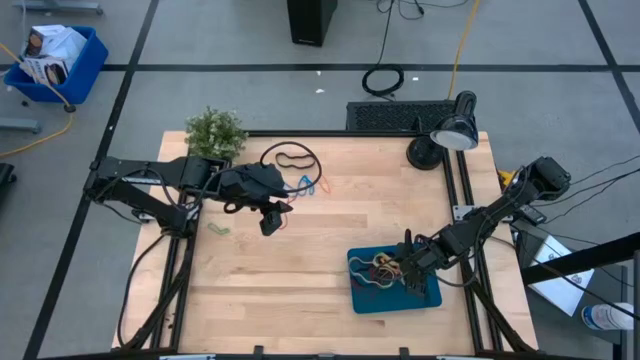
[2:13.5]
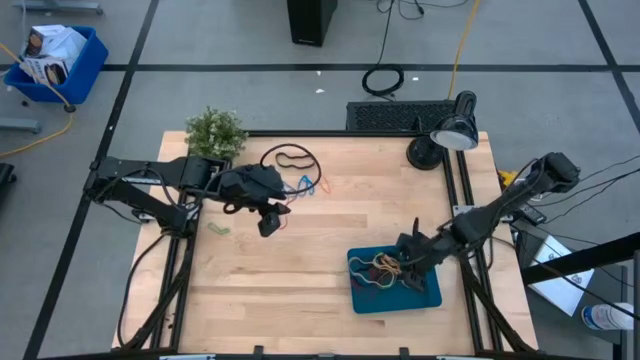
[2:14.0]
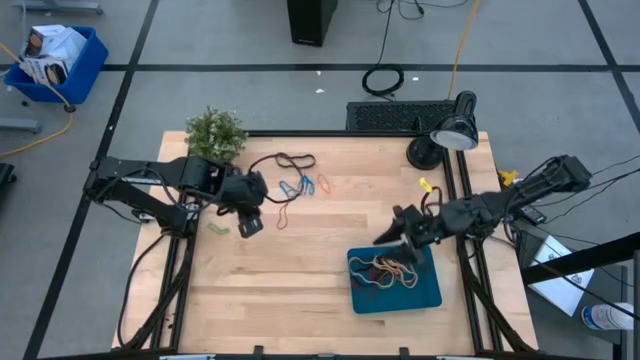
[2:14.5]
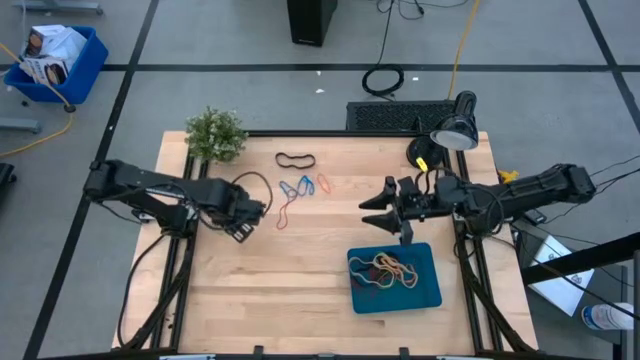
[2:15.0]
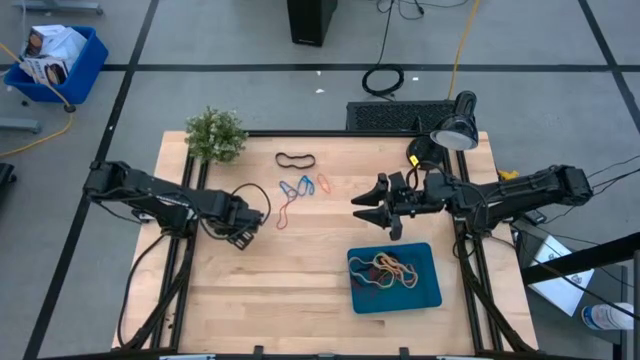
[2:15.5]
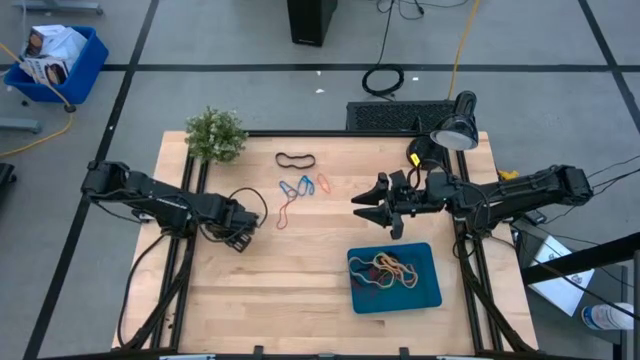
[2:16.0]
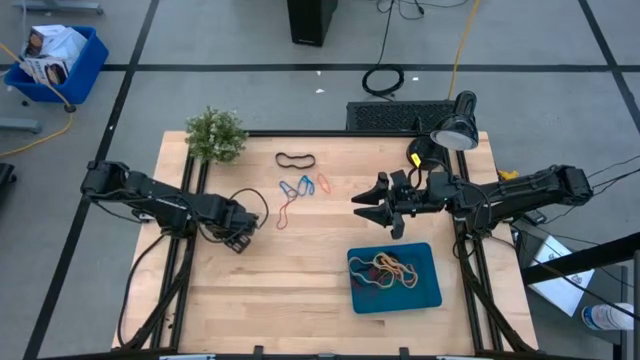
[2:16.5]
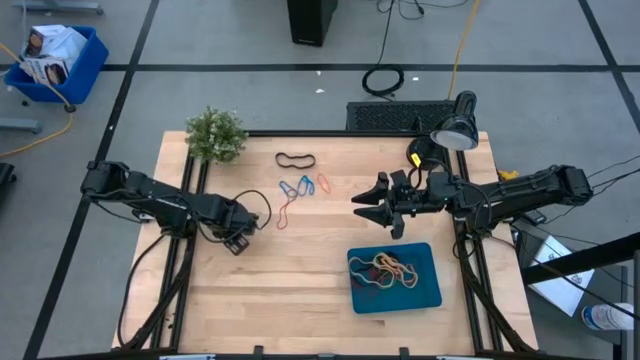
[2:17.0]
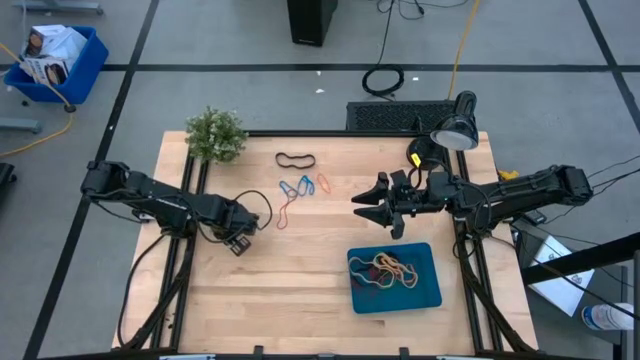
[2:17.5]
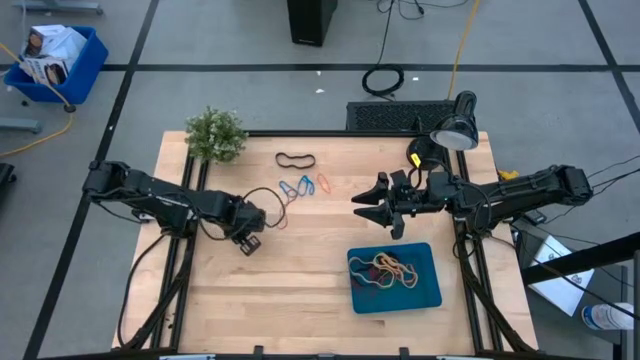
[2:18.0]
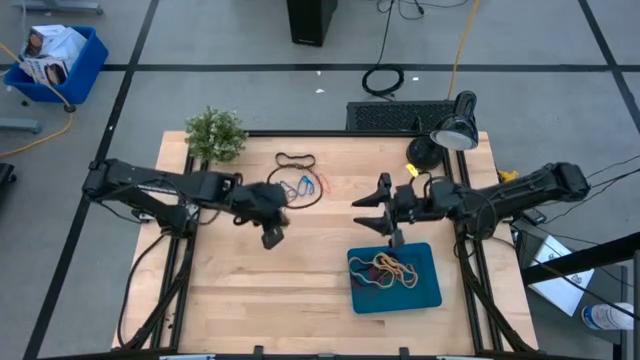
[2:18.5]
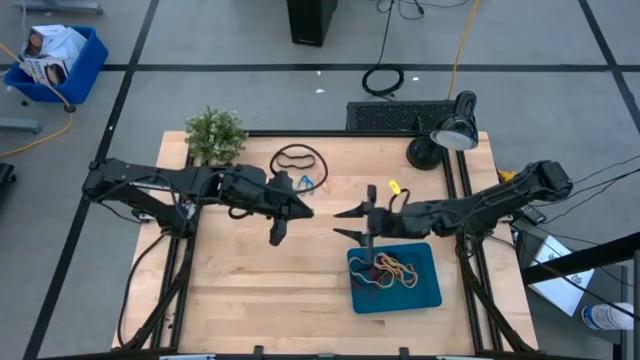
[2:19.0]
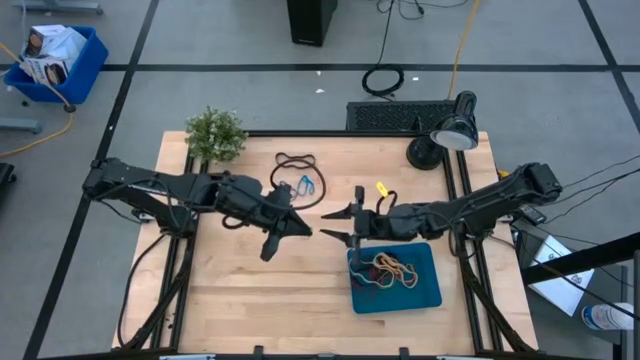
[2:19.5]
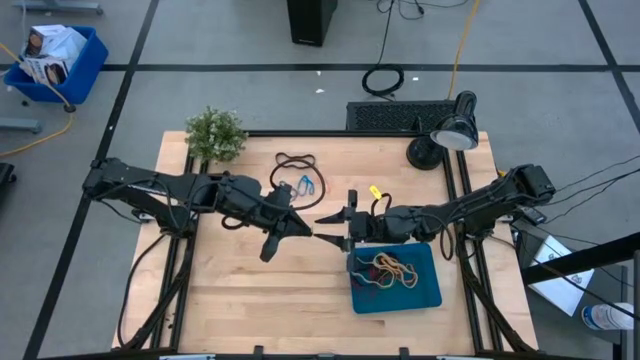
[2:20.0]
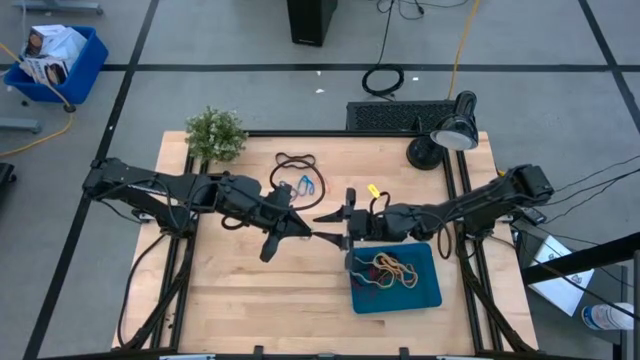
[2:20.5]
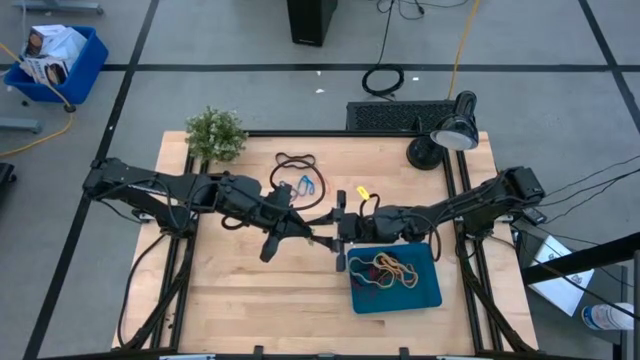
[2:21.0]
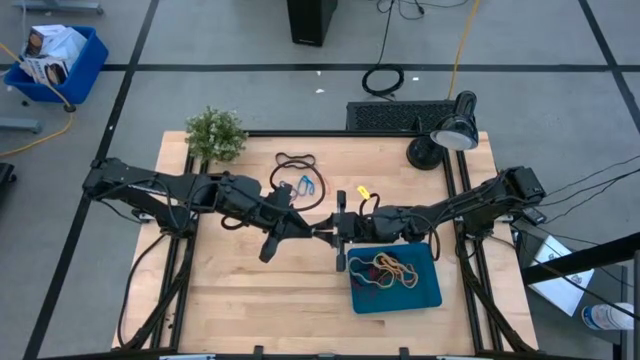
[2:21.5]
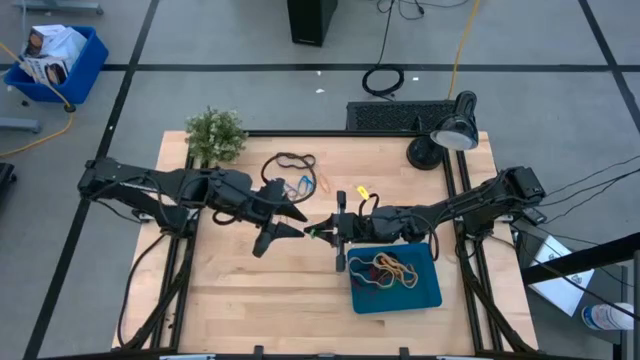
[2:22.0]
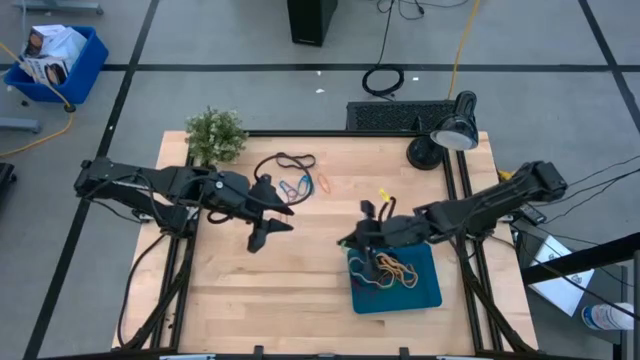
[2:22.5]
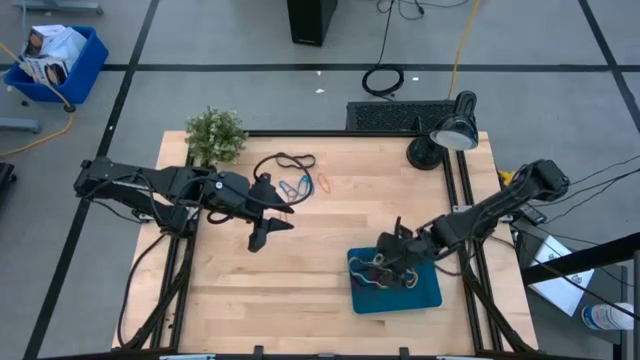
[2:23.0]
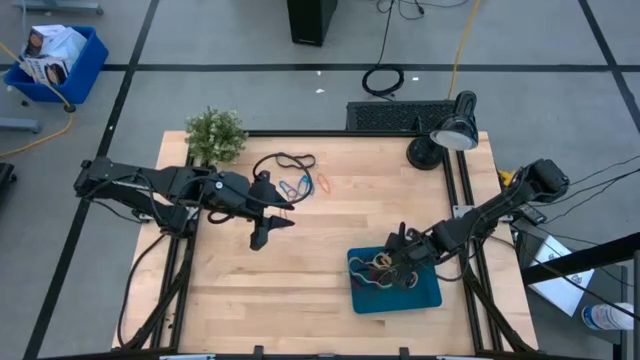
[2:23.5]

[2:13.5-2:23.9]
Task: Pick and place rubber bands into bin
Put the green rubber bands into the blue bin

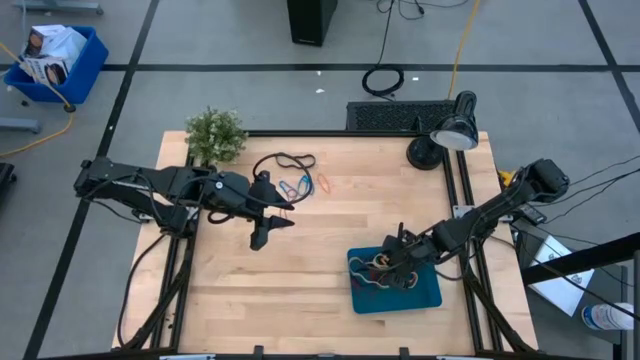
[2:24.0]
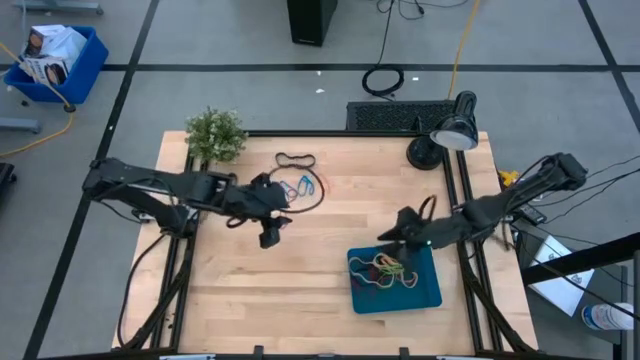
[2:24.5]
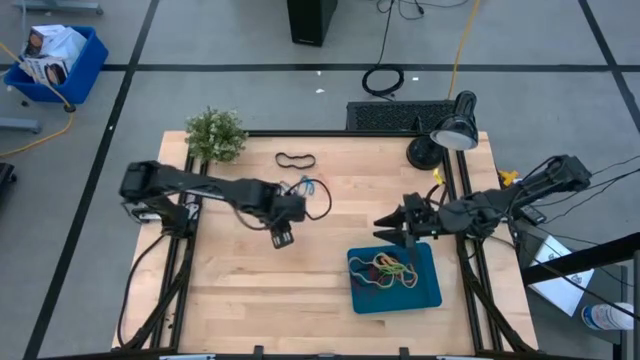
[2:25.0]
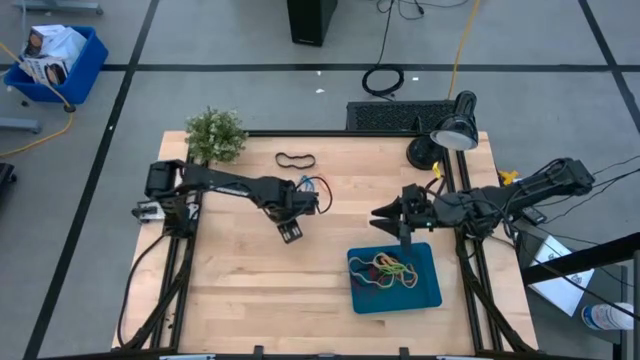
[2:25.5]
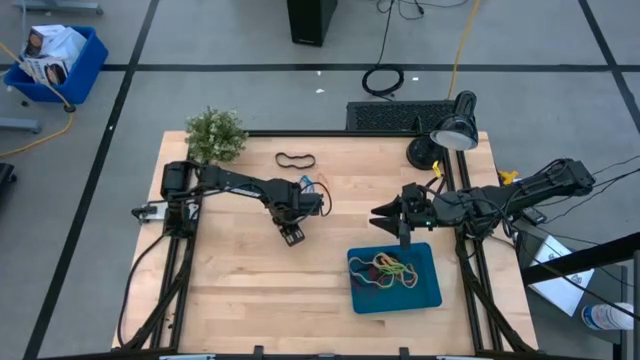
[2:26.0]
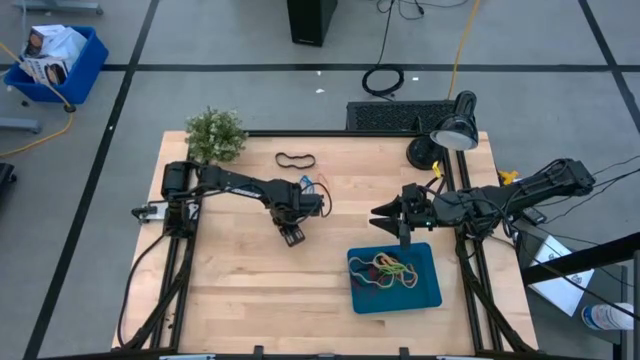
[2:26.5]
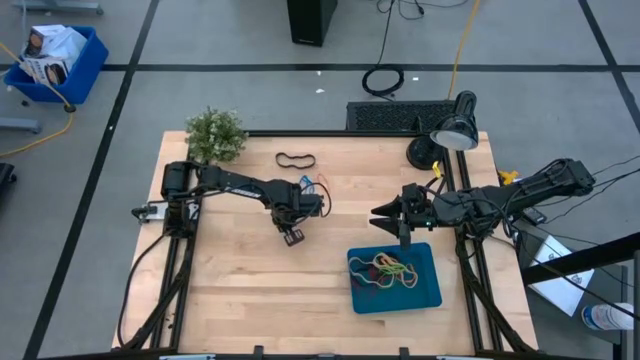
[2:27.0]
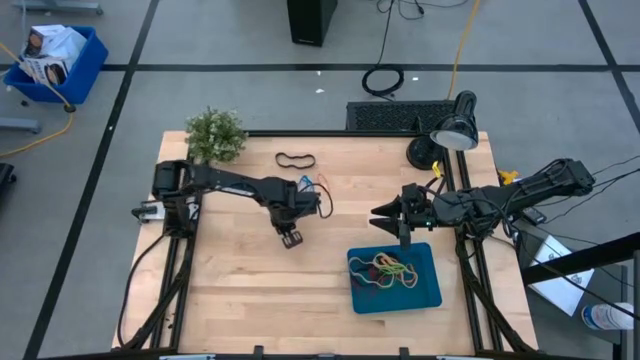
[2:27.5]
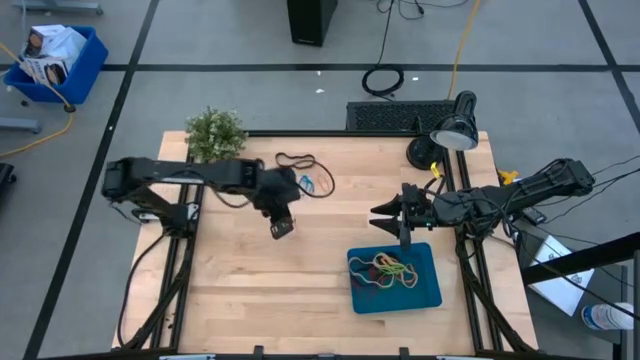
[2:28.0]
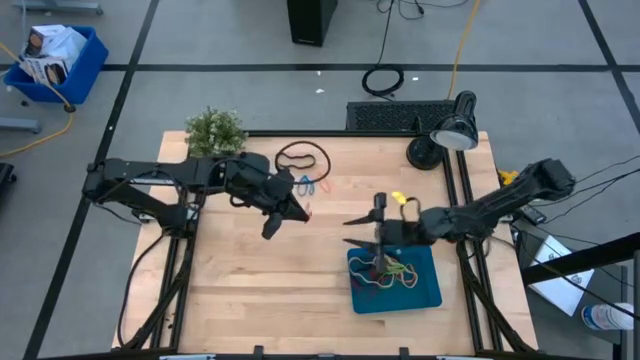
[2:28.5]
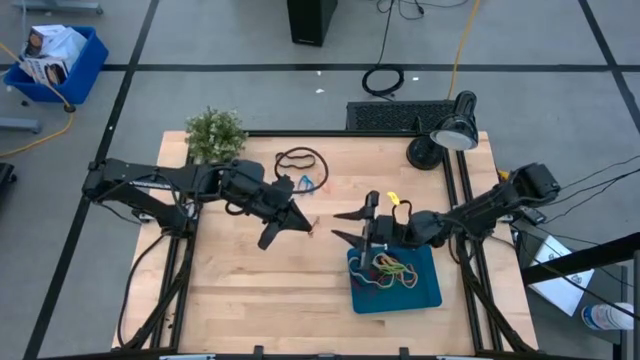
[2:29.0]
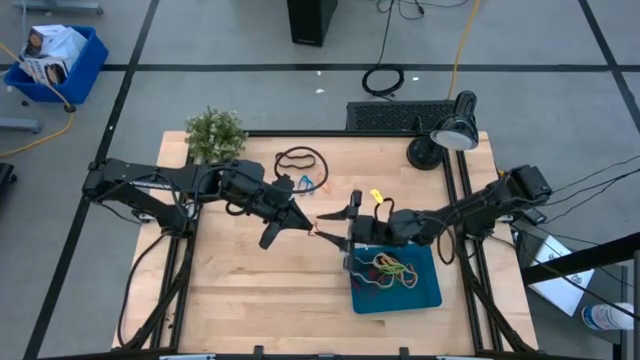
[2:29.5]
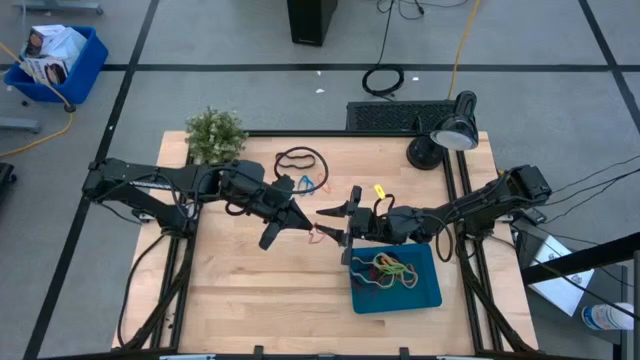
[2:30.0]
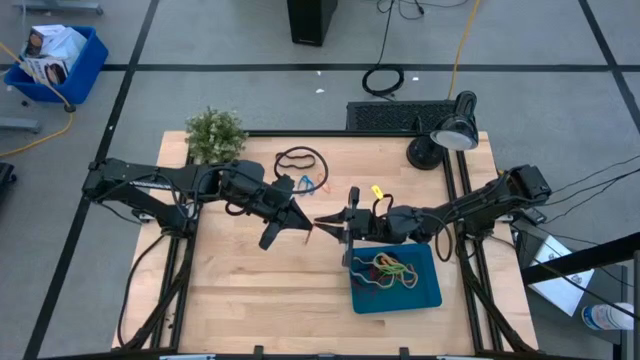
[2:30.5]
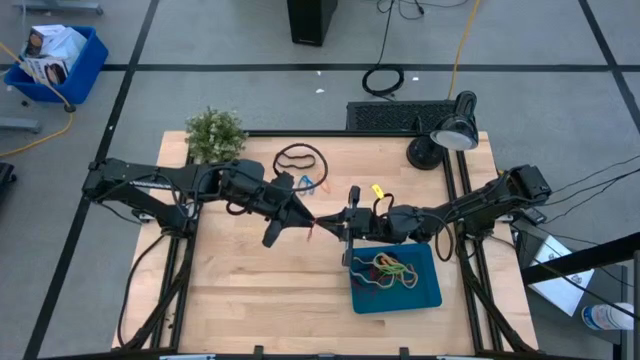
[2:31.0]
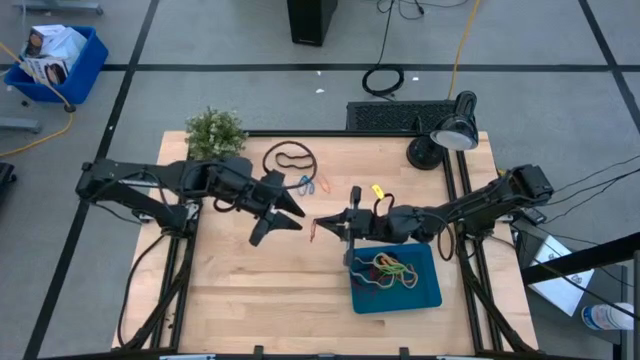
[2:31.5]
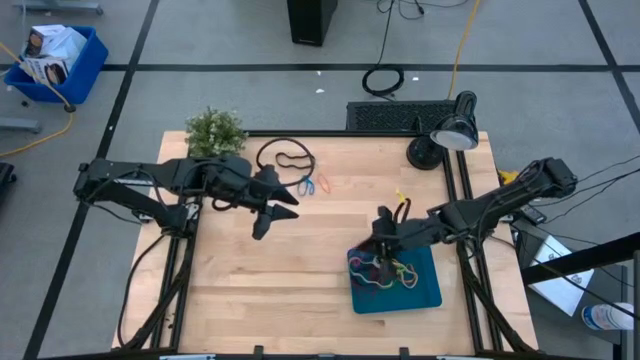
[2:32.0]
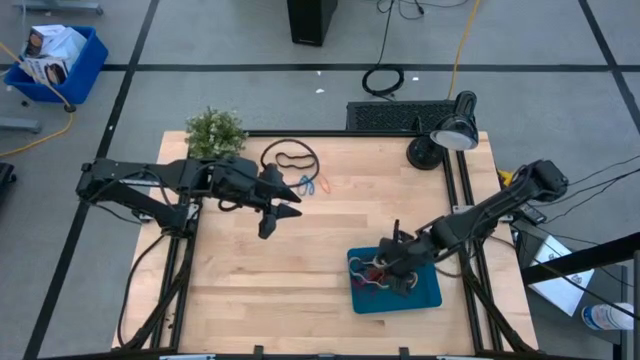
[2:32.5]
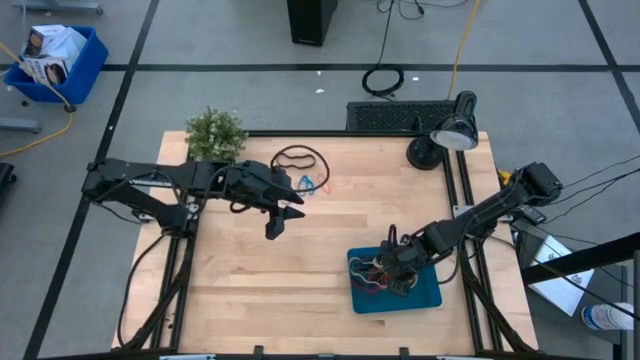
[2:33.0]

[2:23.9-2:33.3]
Put the red rubber band into the blue bin
